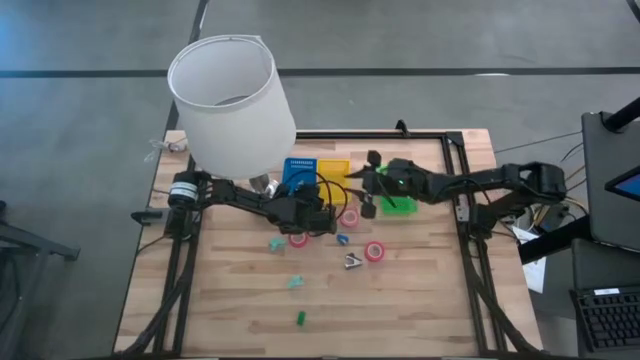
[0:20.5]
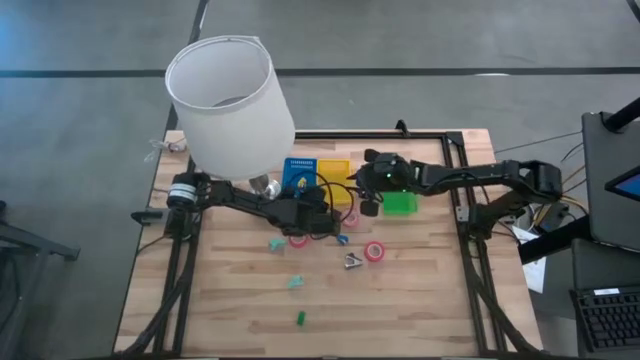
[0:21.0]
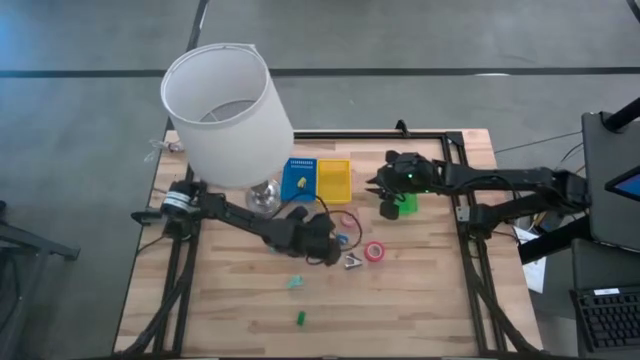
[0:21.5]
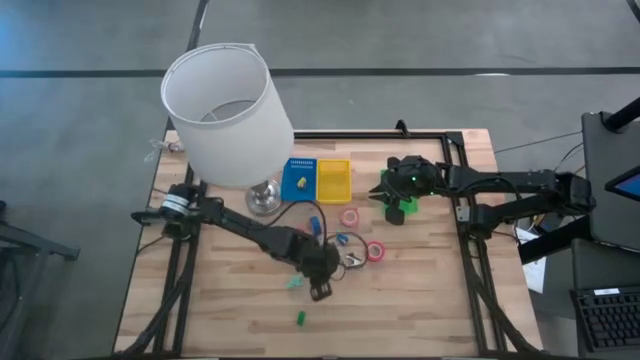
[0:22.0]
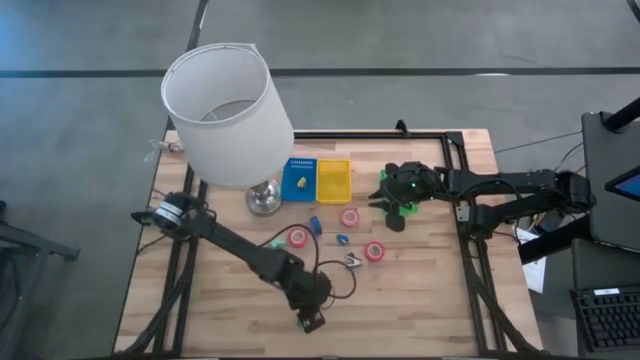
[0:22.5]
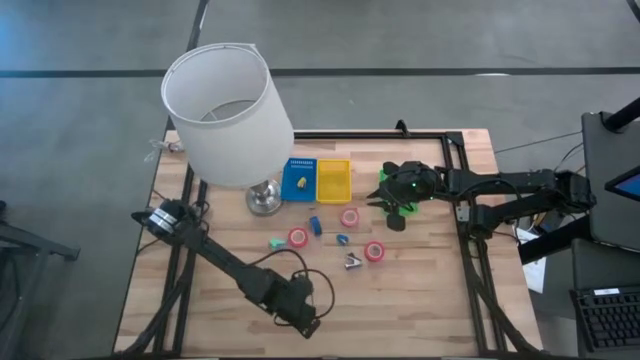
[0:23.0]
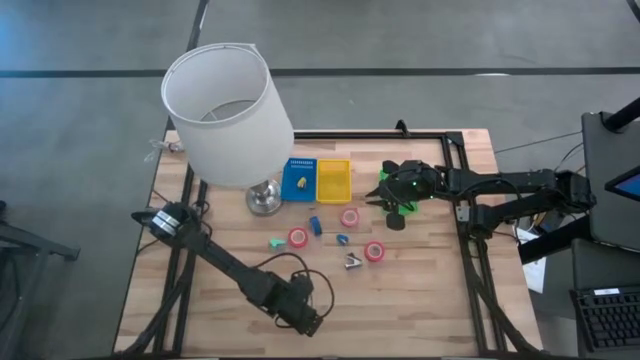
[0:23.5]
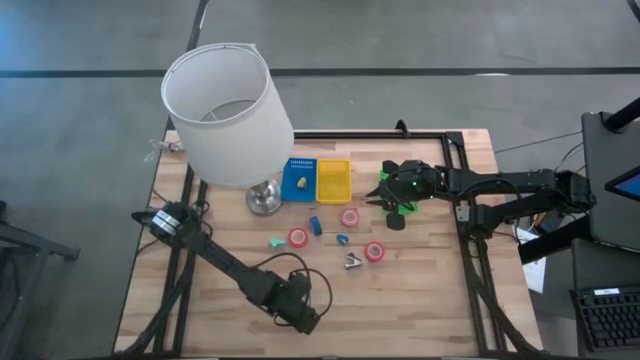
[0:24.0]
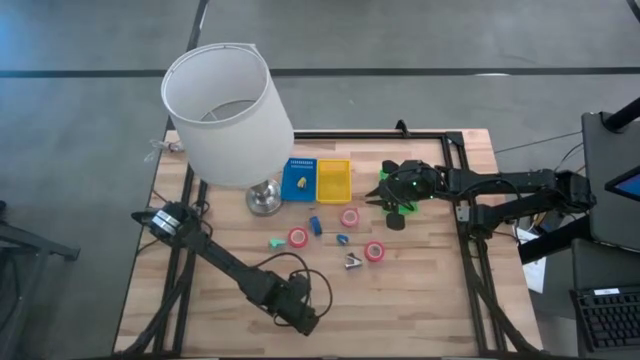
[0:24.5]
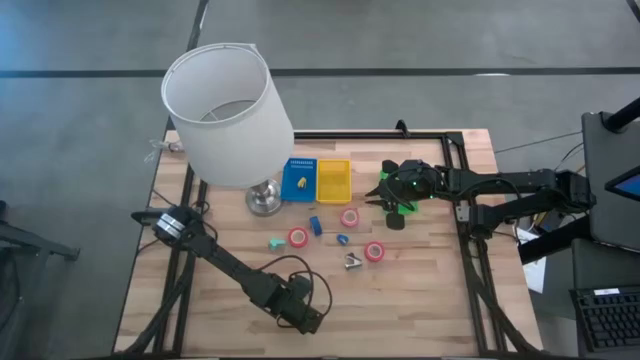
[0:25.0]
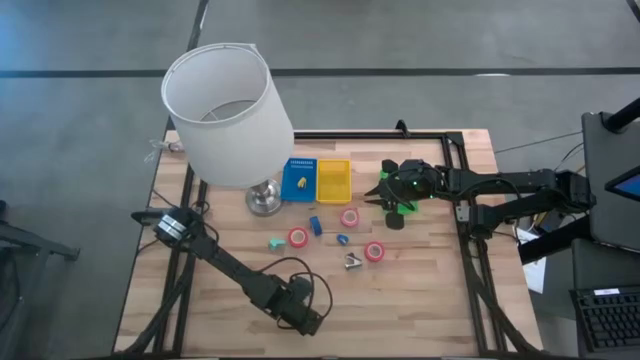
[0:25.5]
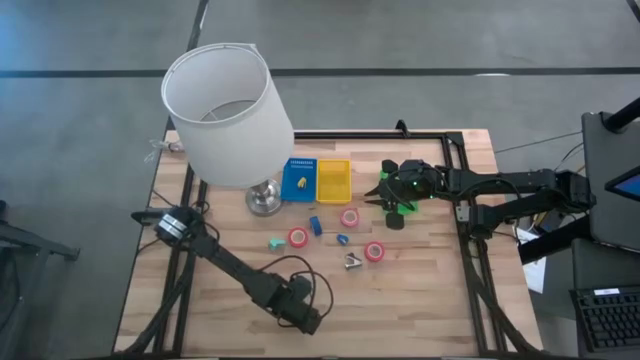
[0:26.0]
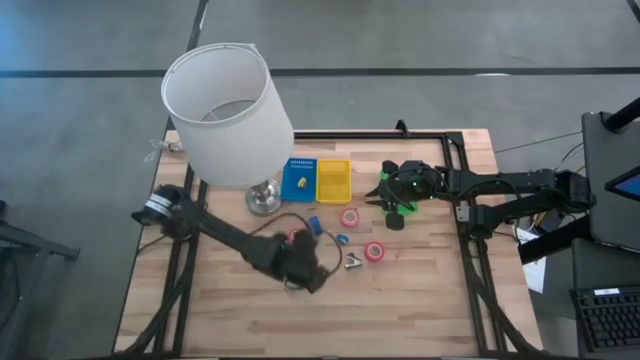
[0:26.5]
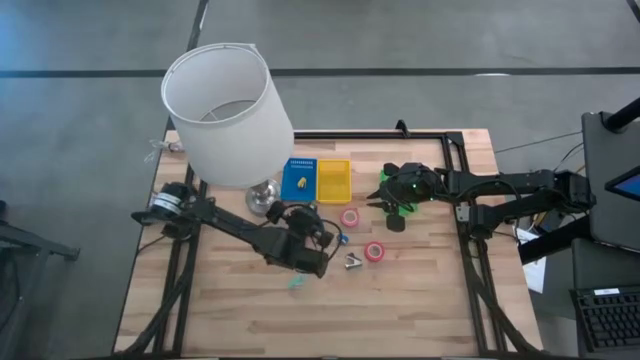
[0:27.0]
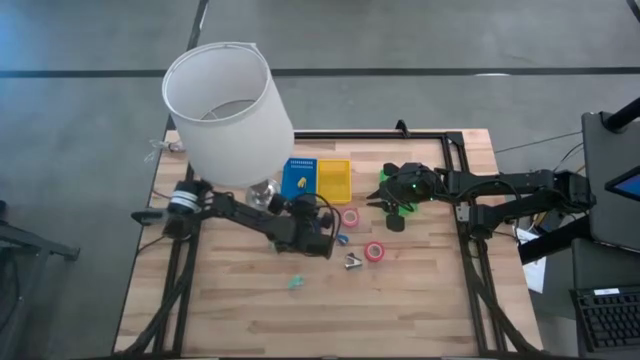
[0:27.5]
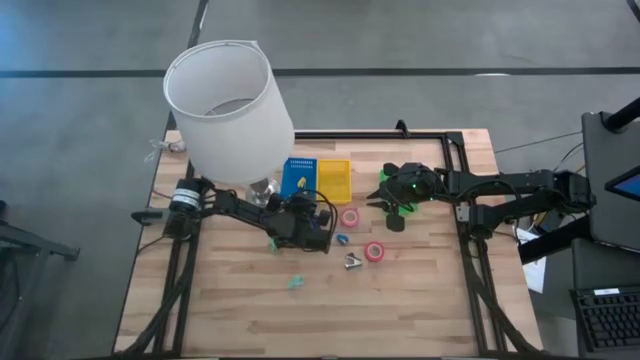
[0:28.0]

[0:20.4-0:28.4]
Task: Pick and place Stapler, Stapler remover, tape
Put the green stapler into the blue bin

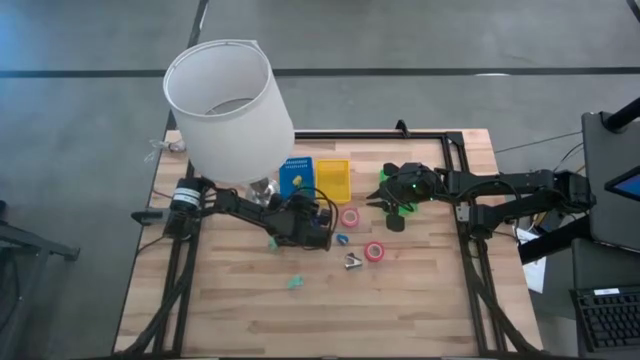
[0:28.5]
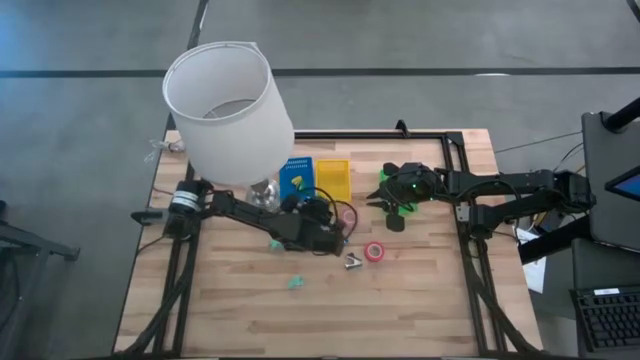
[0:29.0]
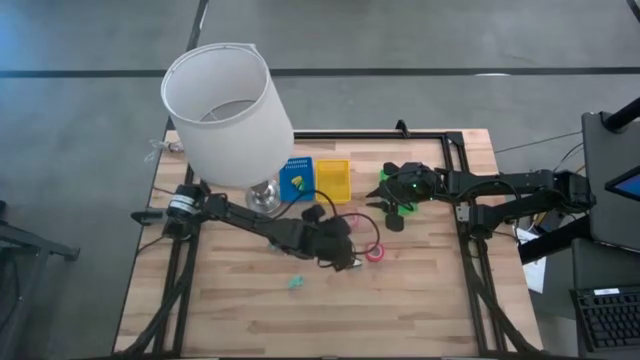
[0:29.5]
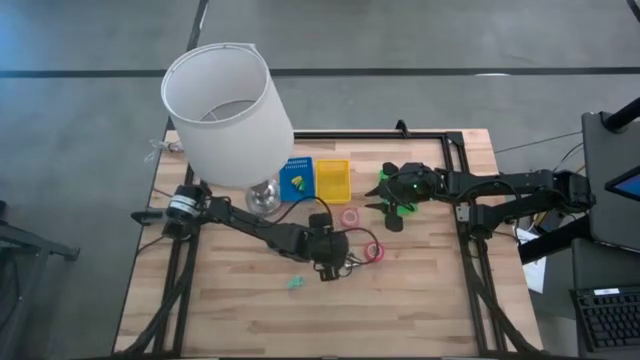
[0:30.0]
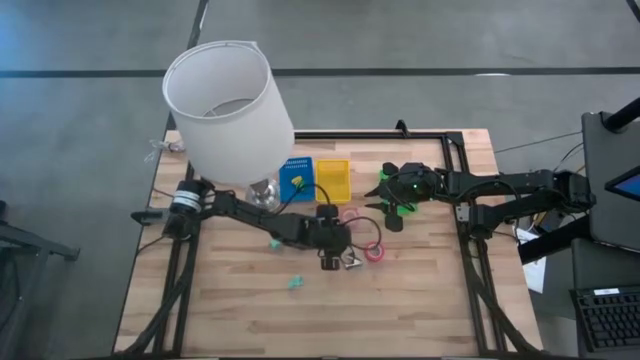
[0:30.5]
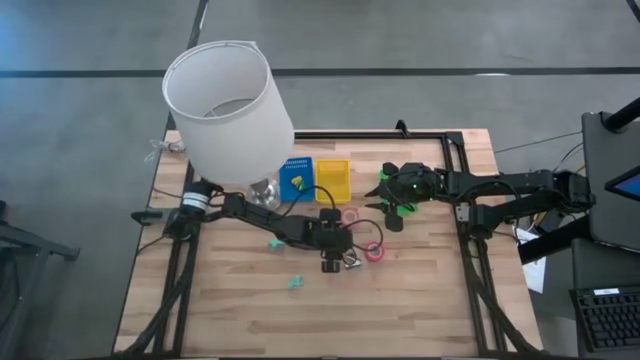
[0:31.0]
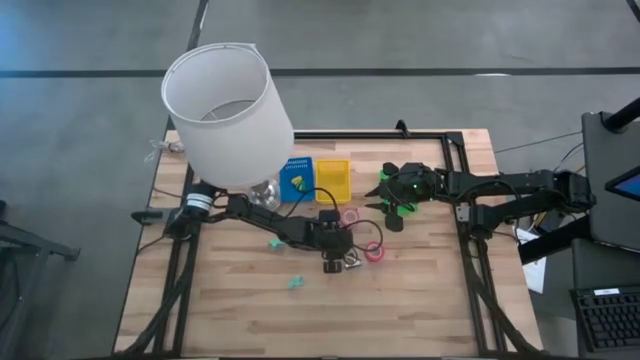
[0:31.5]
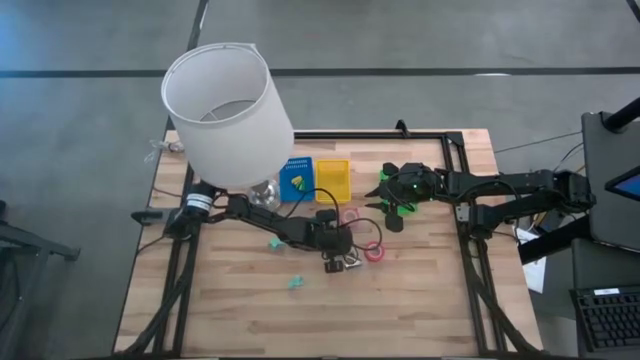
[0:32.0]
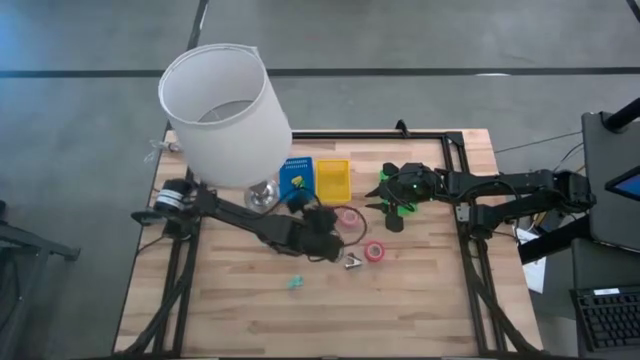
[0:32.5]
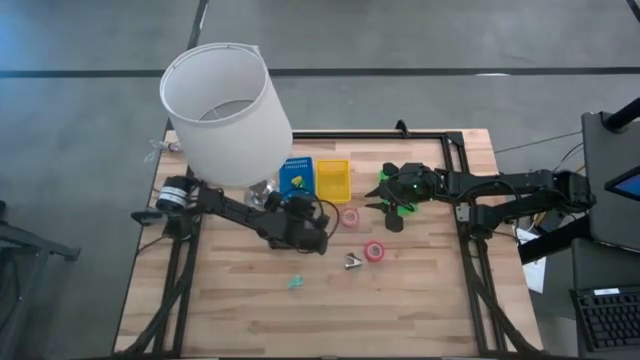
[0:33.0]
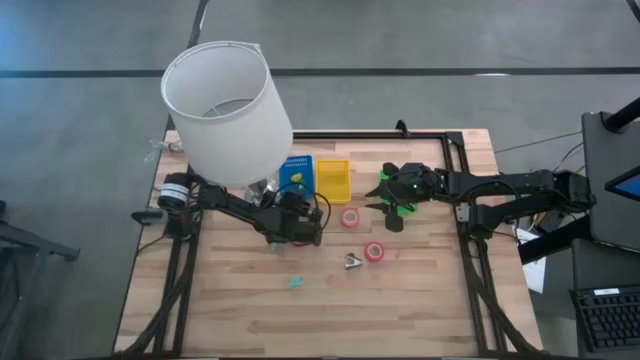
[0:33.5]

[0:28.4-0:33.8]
Put the blue stapler into the blue bin

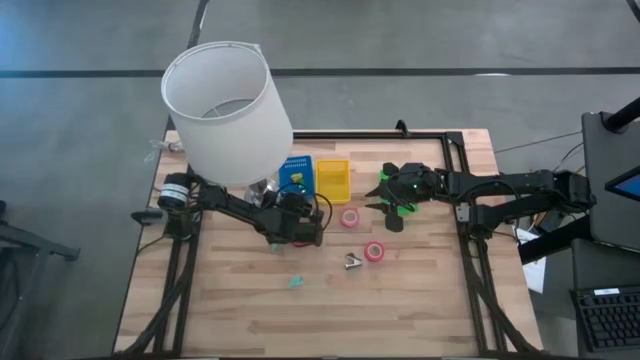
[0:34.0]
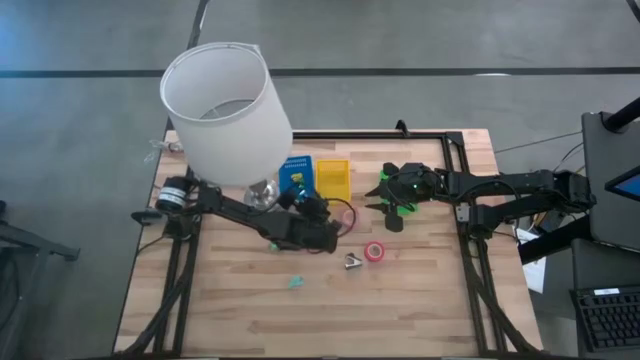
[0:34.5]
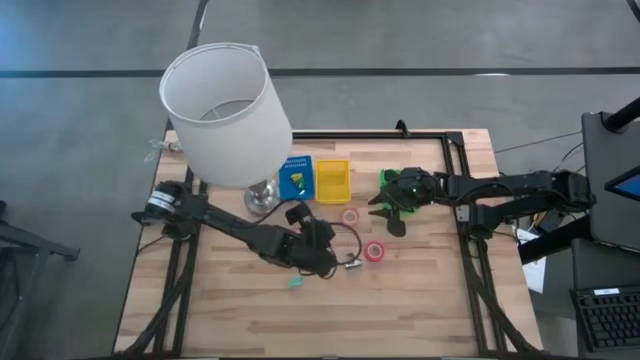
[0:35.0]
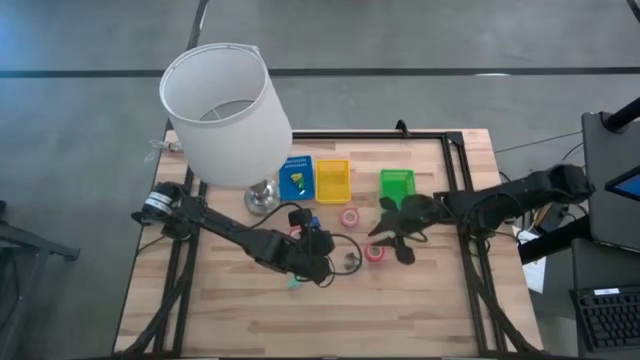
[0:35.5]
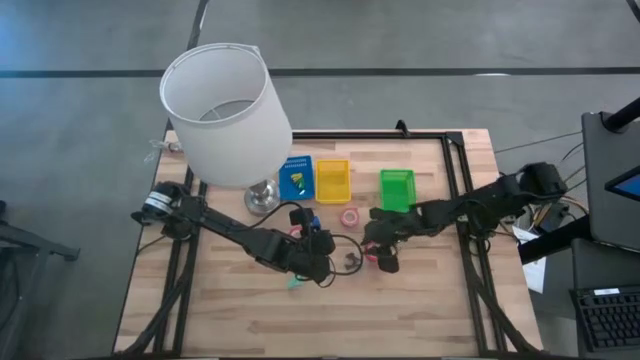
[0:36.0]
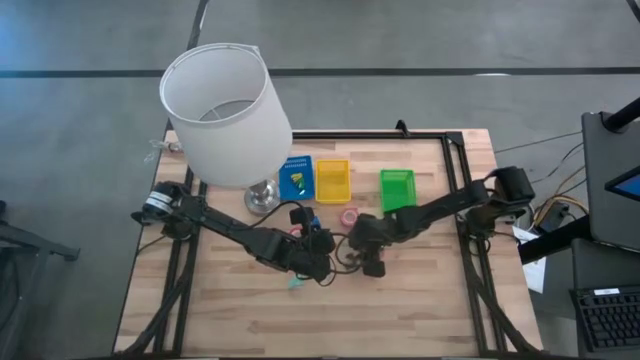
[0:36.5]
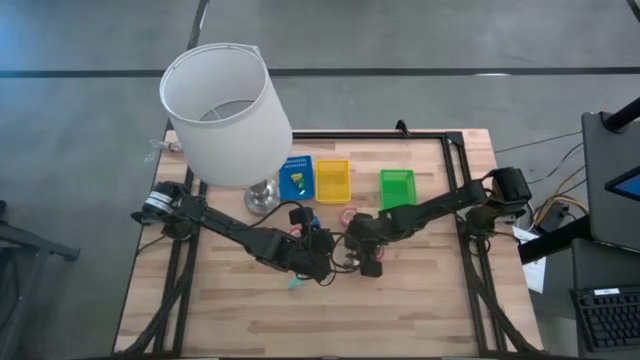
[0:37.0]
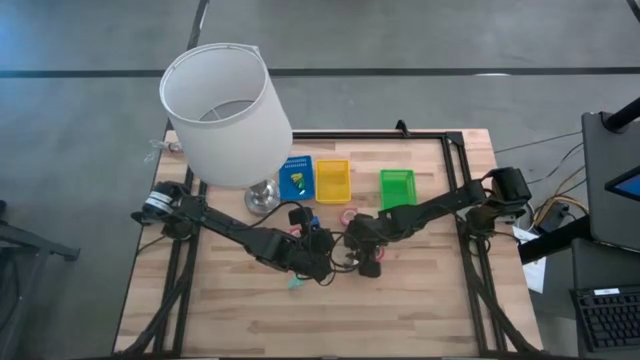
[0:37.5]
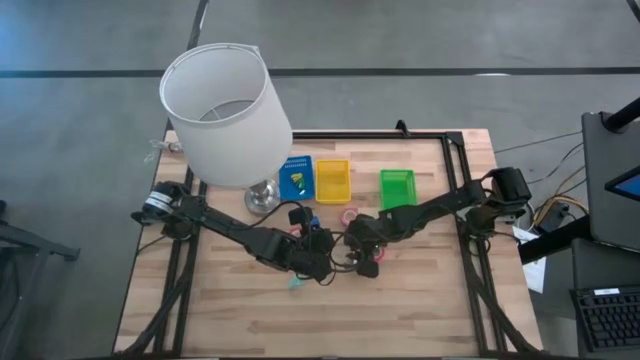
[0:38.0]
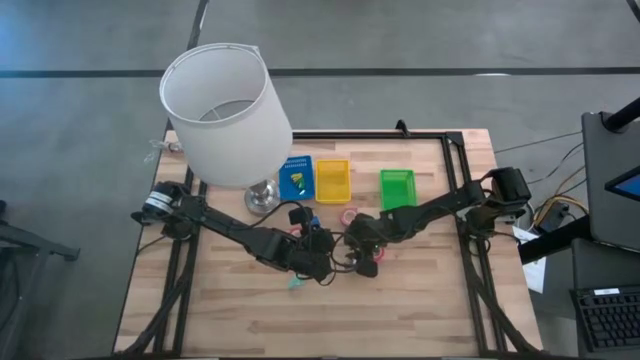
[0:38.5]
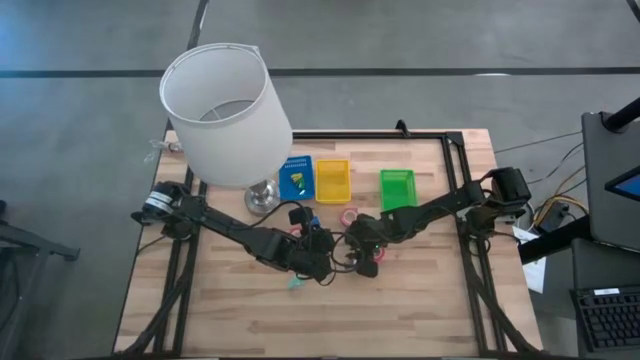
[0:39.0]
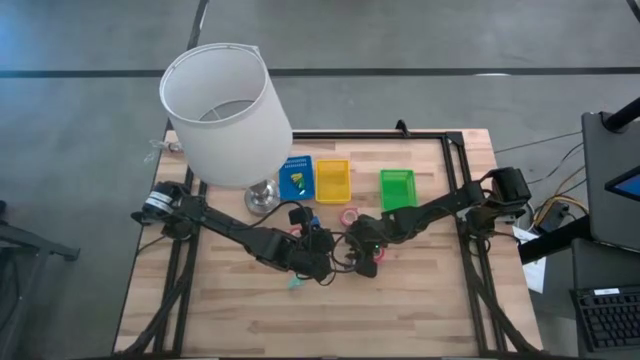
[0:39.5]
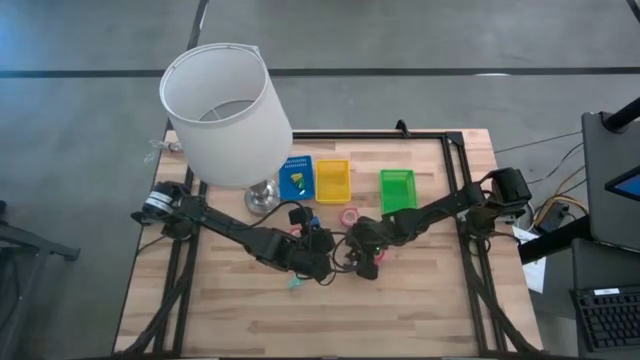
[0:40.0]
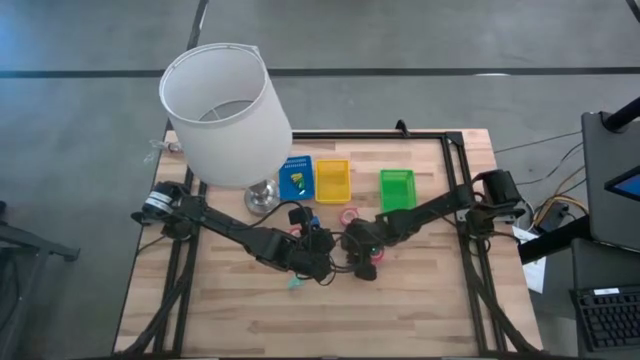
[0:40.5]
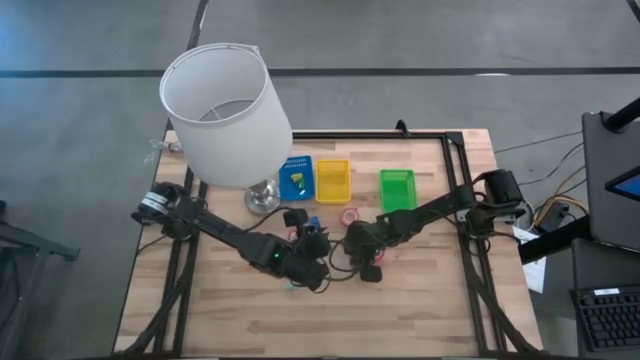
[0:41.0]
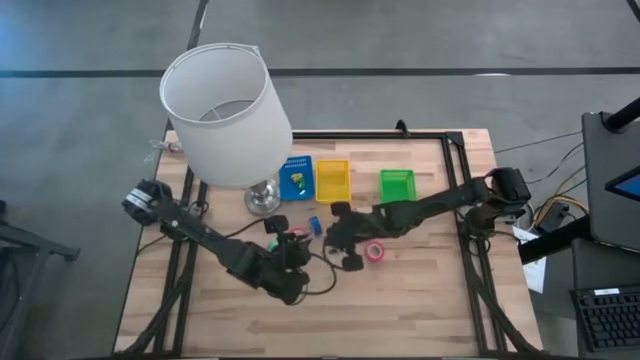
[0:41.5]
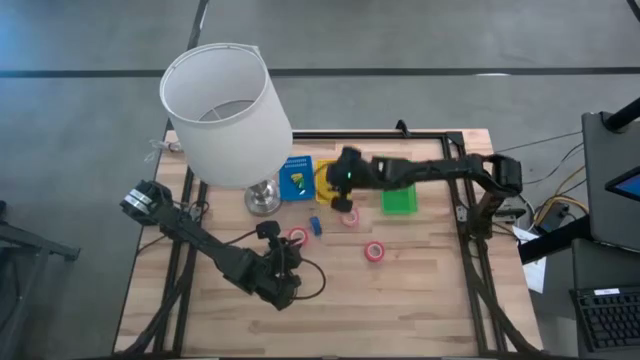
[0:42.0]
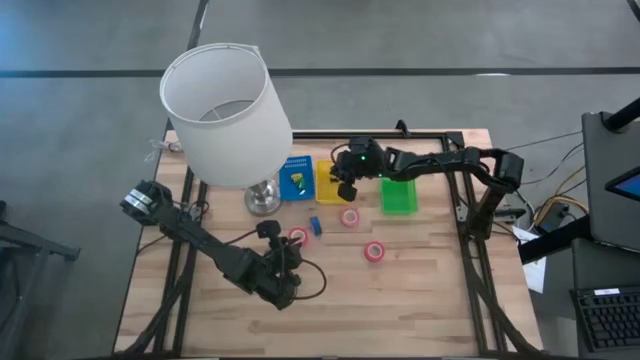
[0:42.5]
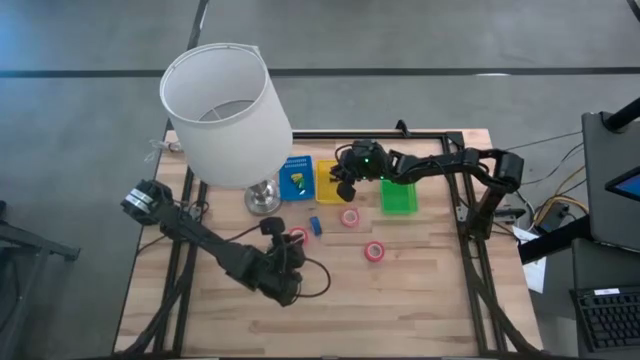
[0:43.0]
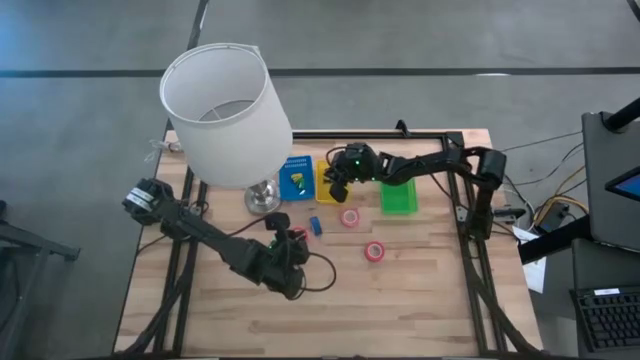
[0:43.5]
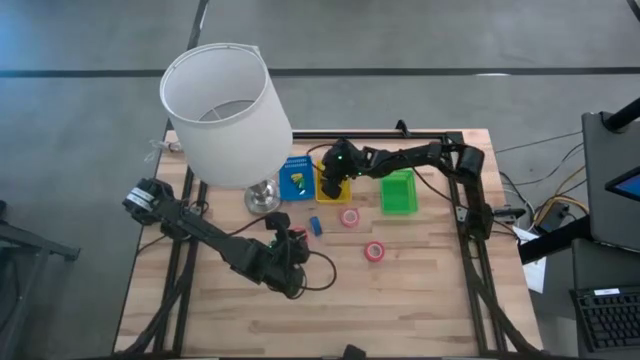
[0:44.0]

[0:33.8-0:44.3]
Put the black staple remover into the yellow bin
